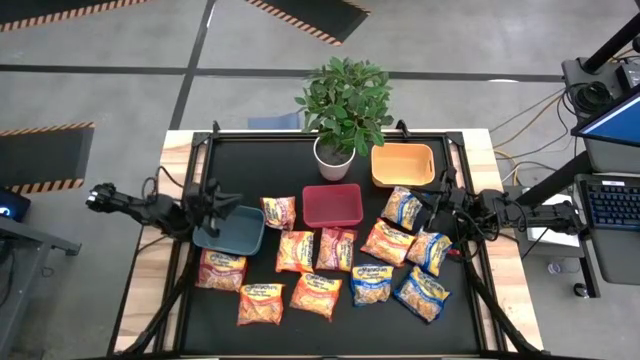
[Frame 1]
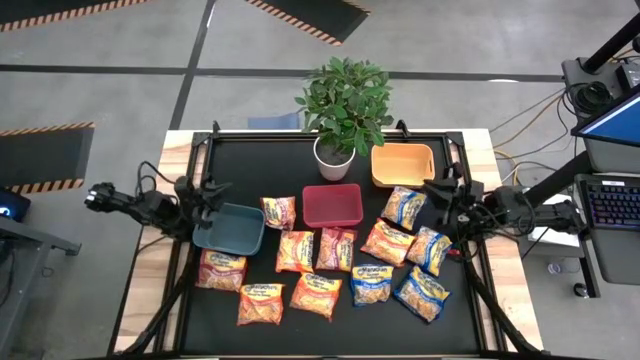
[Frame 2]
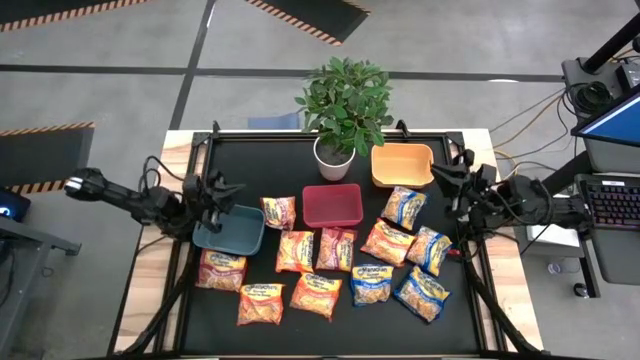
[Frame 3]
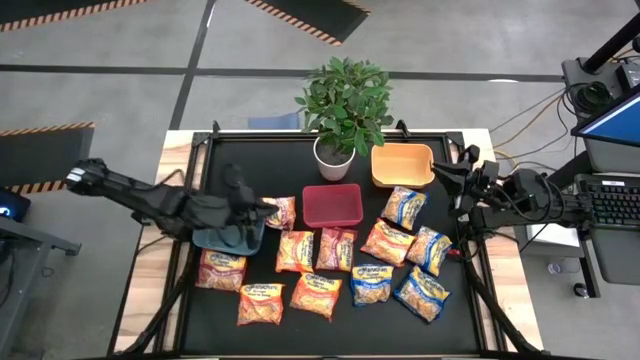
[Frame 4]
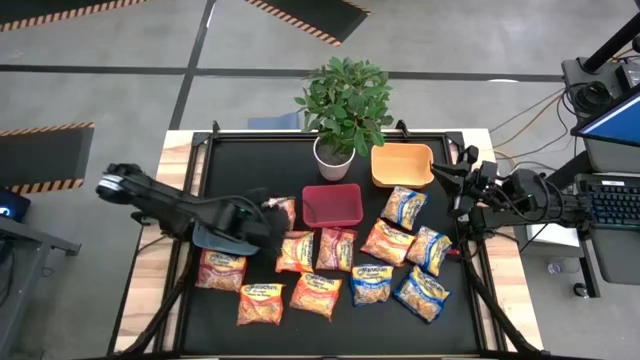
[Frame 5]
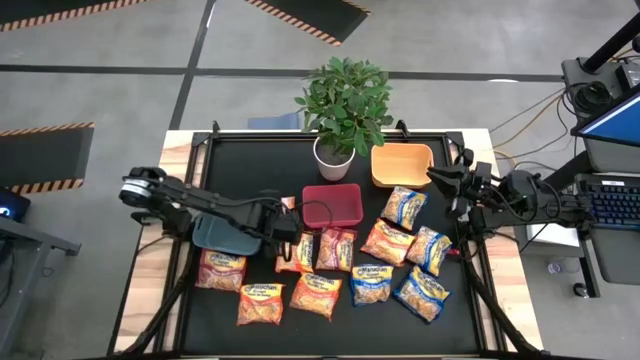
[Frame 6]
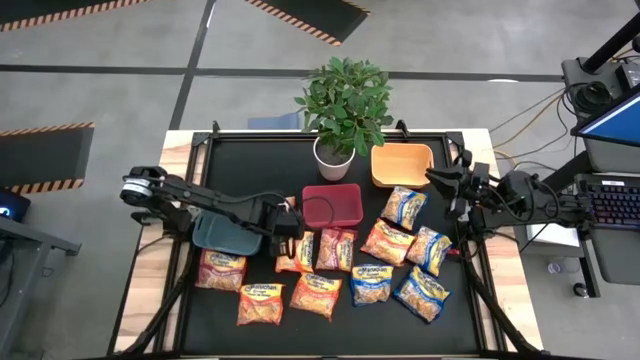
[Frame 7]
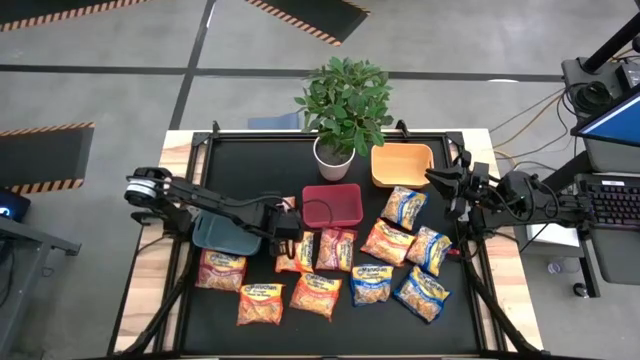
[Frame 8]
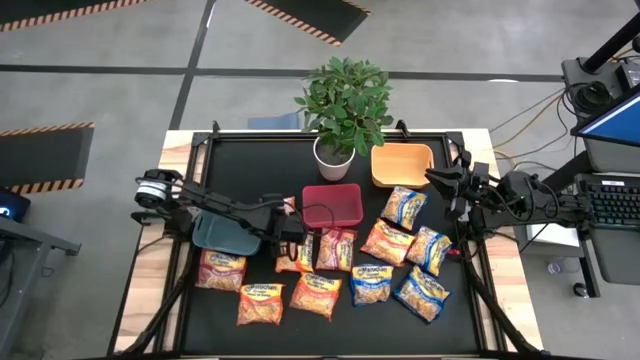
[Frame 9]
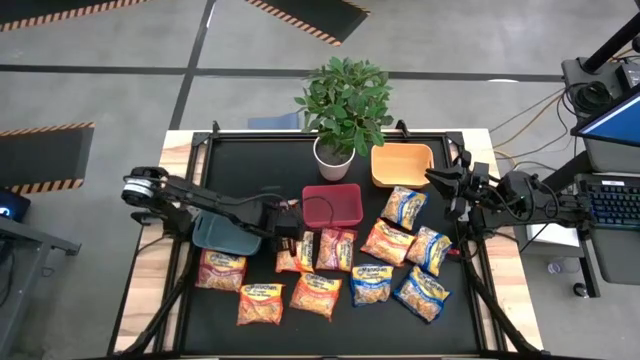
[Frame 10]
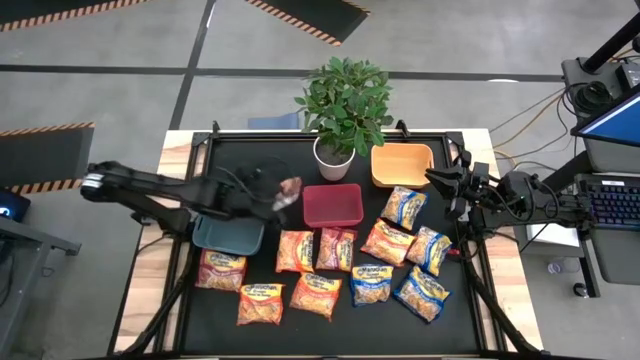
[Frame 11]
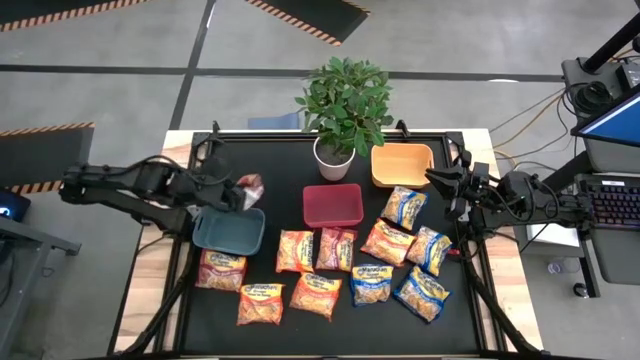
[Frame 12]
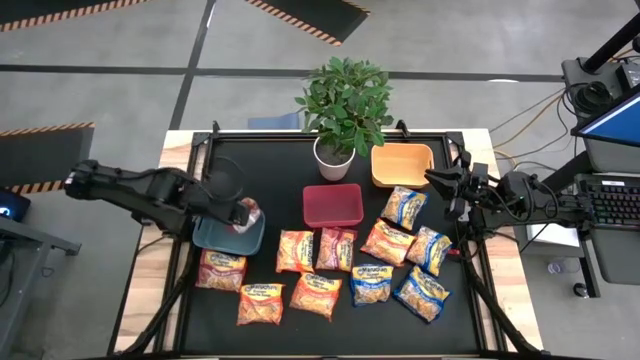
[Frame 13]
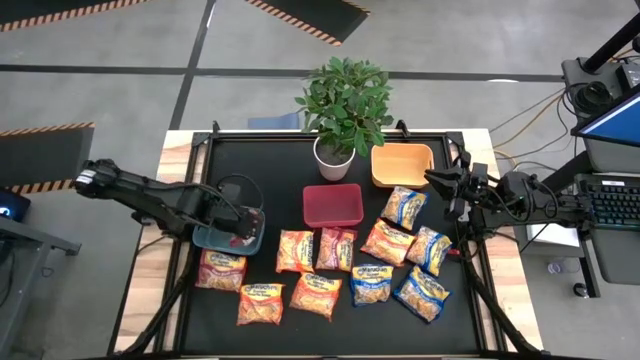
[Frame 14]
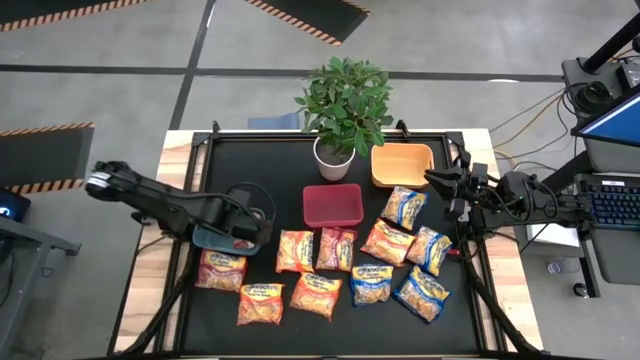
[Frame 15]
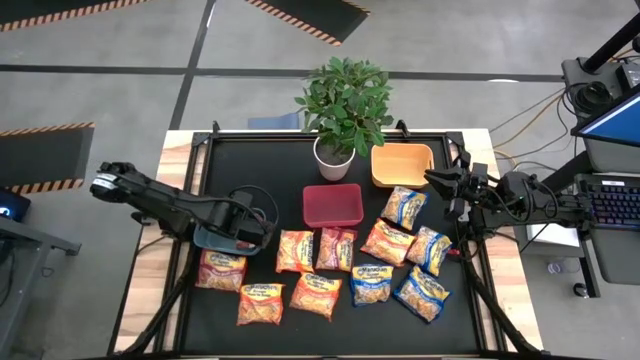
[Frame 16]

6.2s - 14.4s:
Task: Sort Maruchan noodles
Put the top red noodle pack into the green bin

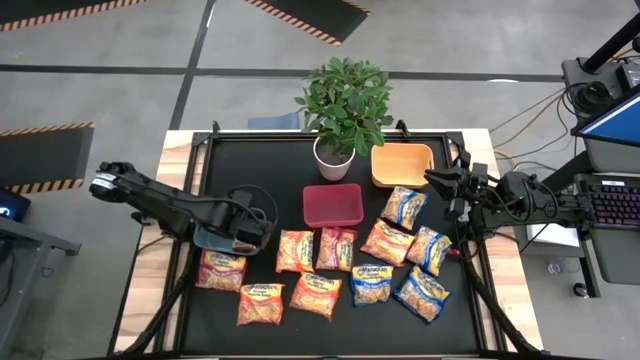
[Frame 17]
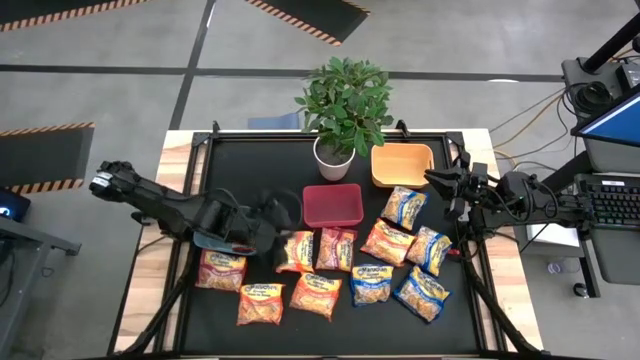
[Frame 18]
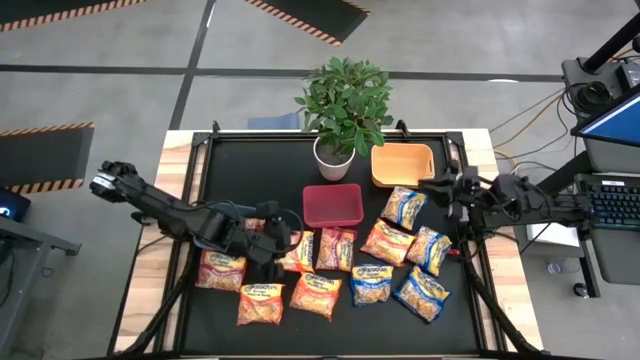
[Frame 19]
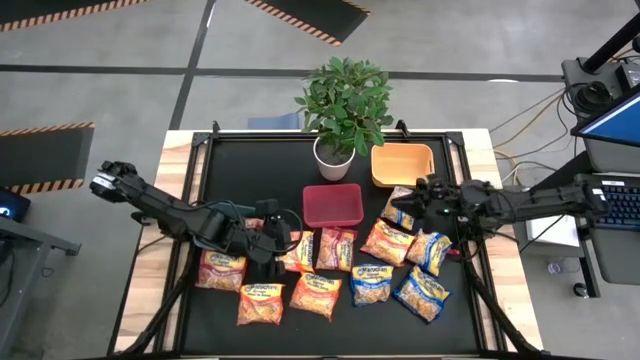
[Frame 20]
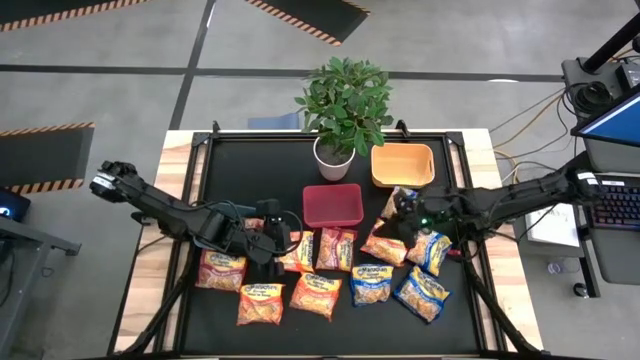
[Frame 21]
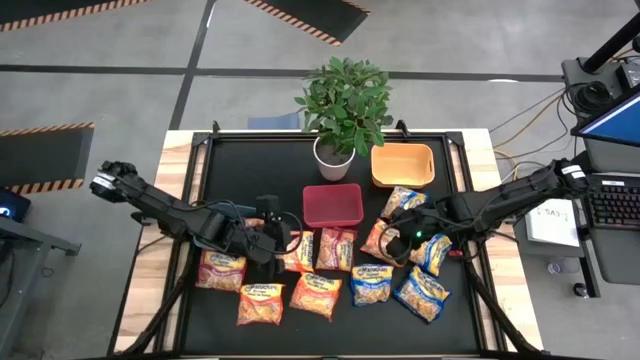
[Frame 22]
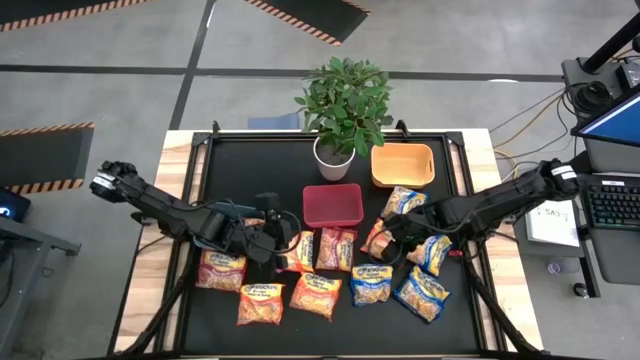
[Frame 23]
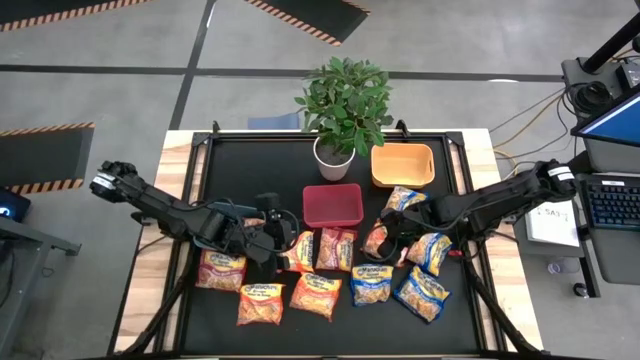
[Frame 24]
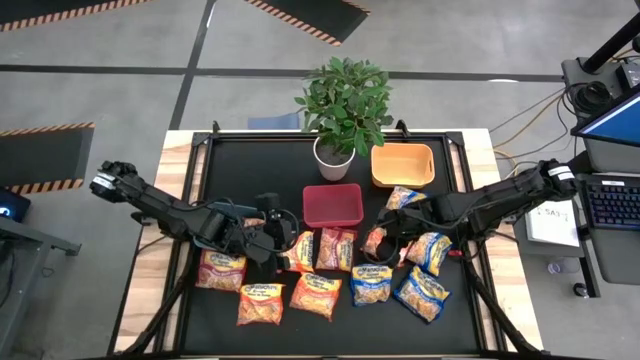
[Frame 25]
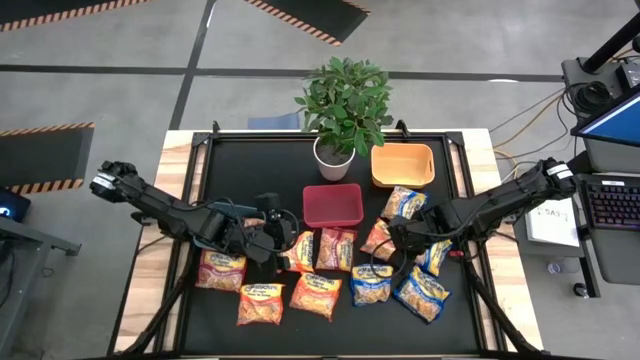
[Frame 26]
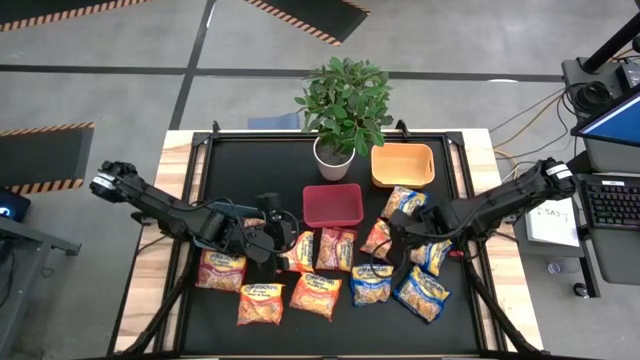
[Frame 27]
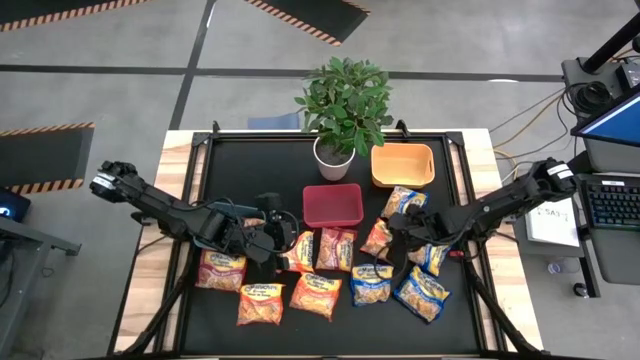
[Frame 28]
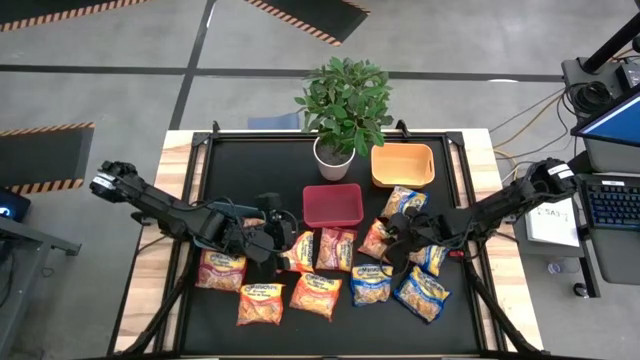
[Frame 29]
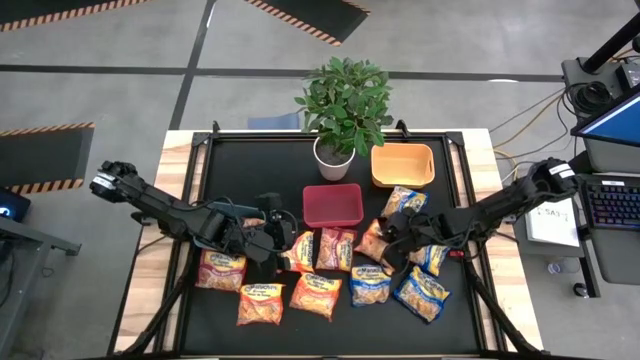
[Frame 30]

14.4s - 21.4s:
Put the top right orange noodle pack into the red bin

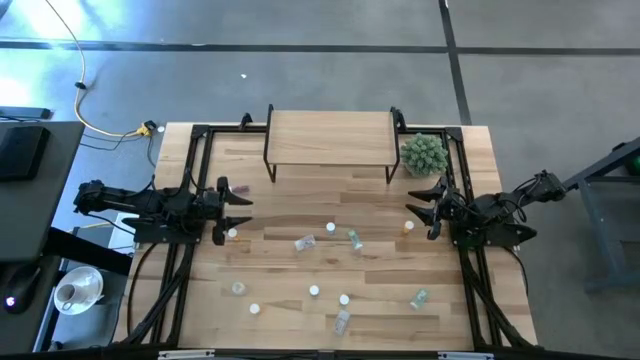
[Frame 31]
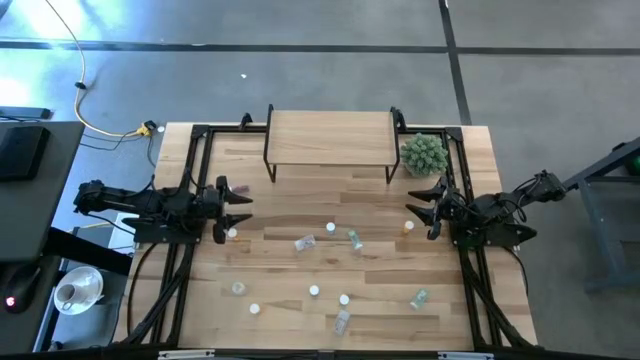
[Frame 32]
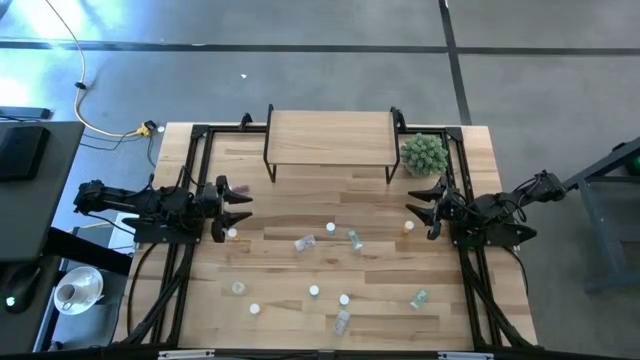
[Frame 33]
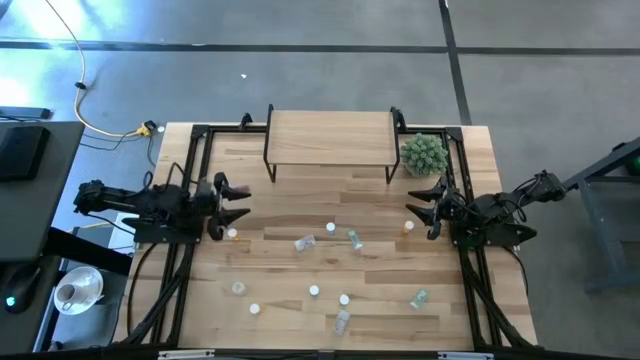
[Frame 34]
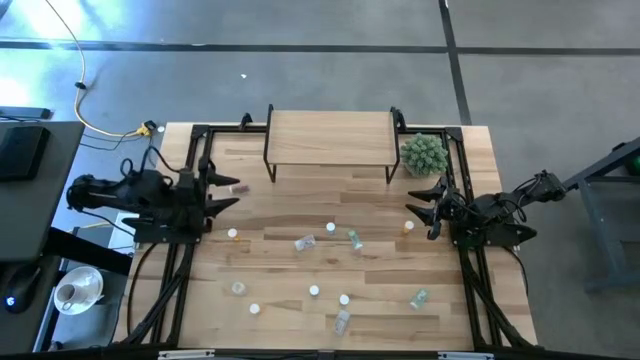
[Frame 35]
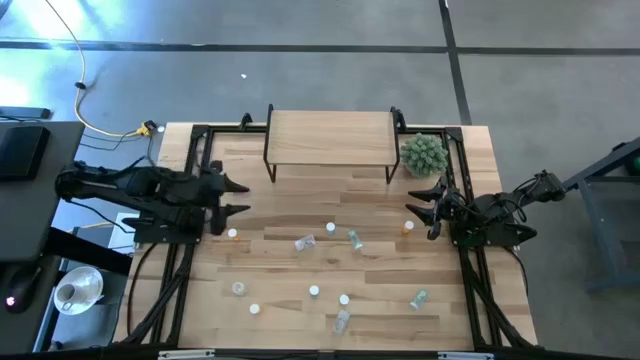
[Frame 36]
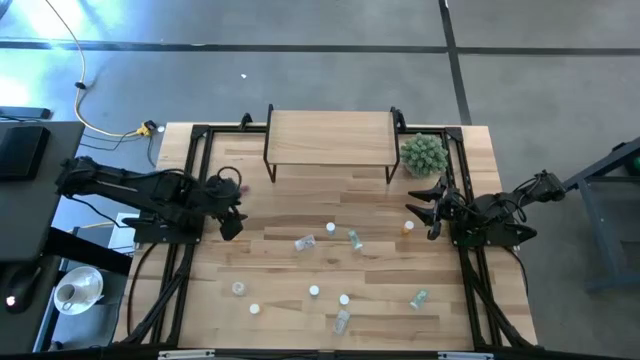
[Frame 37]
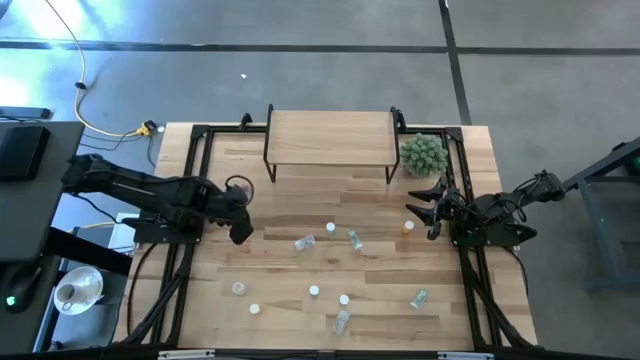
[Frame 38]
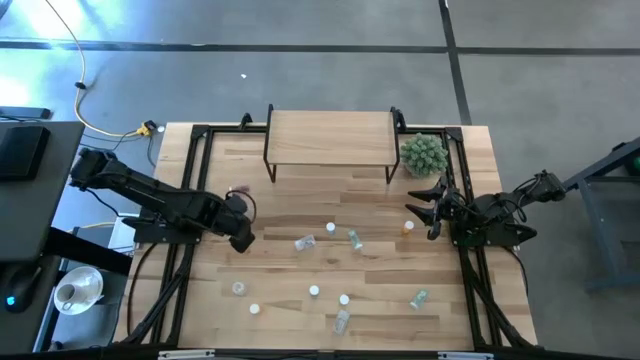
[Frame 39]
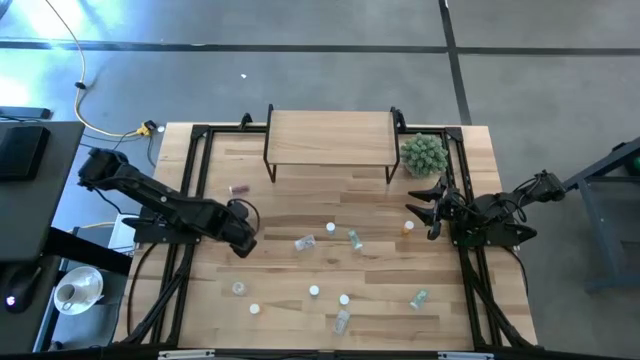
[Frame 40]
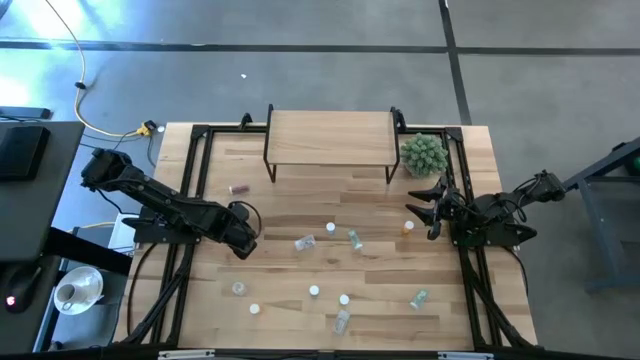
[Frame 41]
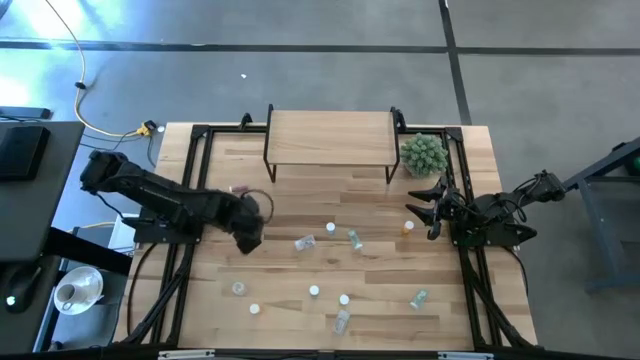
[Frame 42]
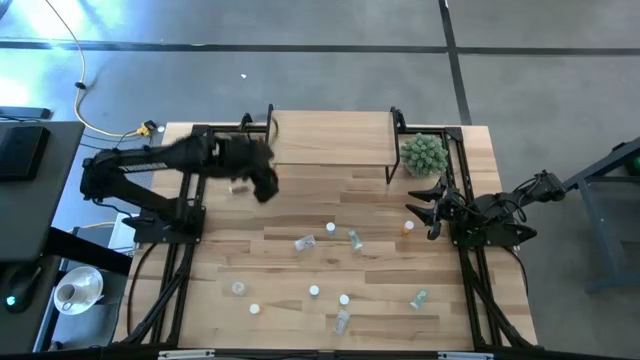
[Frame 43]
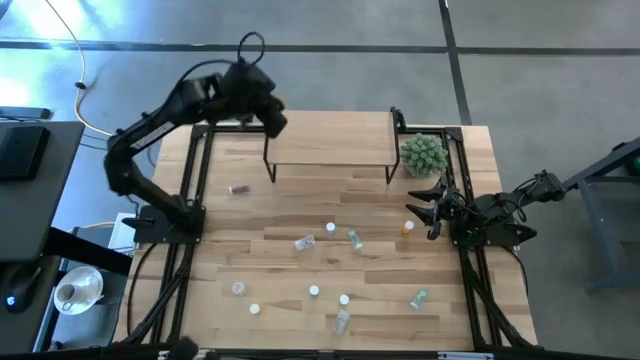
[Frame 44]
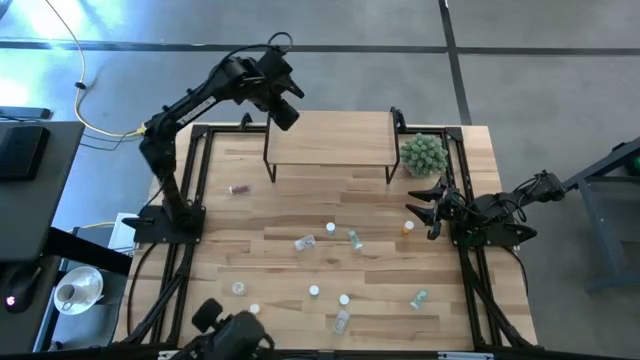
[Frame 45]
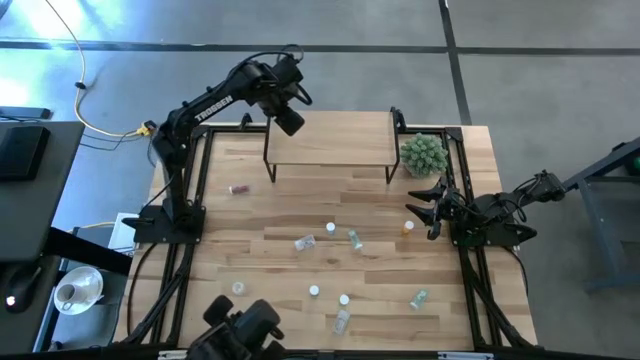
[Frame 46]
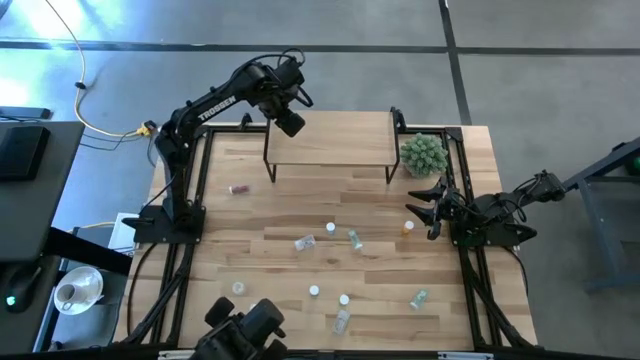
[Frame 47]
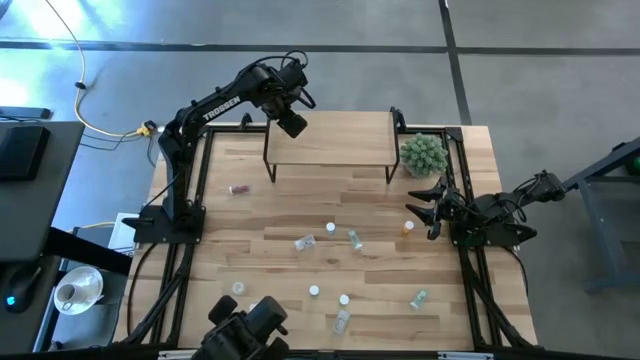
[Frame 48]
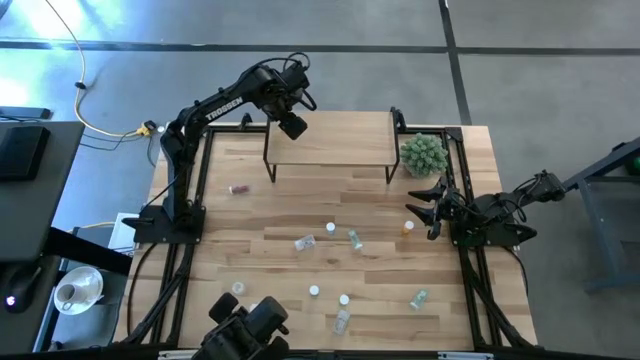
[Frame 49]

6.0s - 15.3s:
Task: Pick and place medicine bottles onto shelf by color
Put the left orange pill bottle on the shelf
